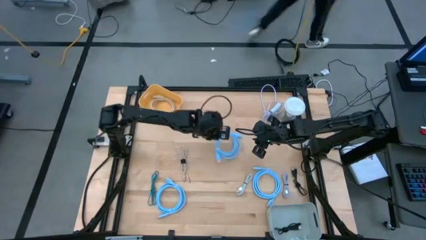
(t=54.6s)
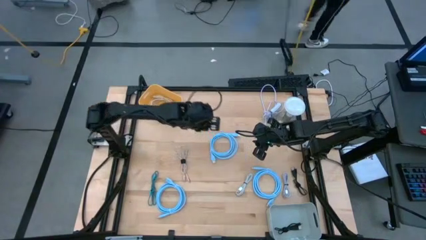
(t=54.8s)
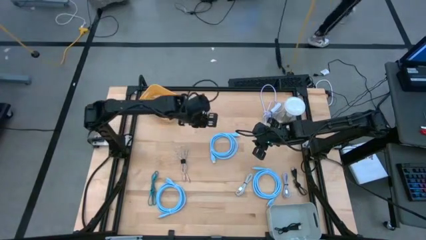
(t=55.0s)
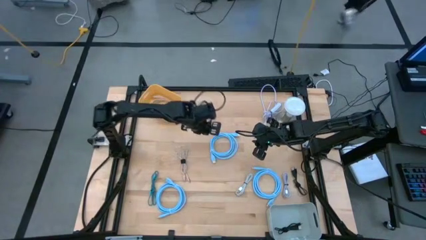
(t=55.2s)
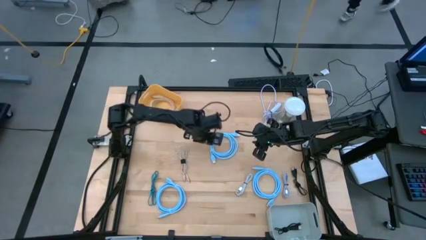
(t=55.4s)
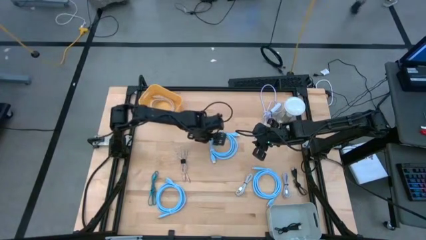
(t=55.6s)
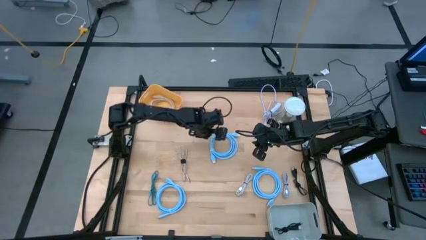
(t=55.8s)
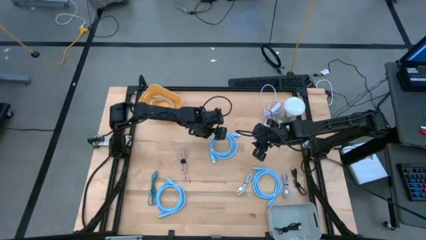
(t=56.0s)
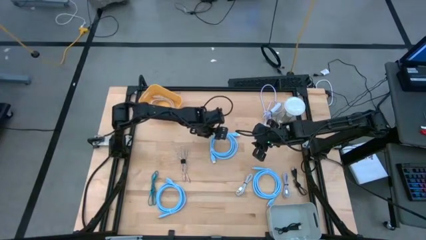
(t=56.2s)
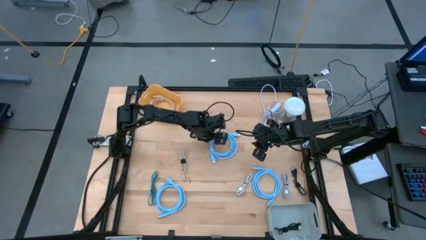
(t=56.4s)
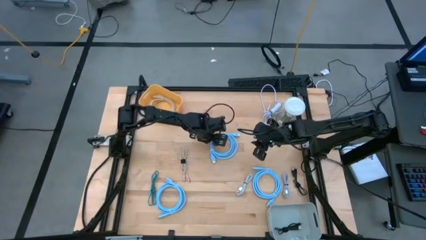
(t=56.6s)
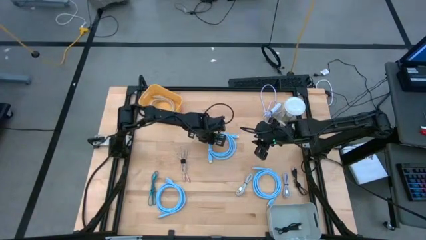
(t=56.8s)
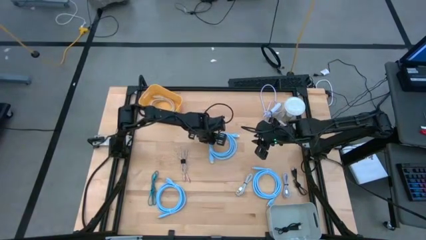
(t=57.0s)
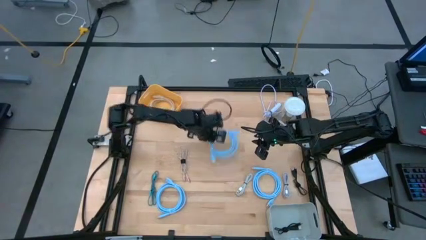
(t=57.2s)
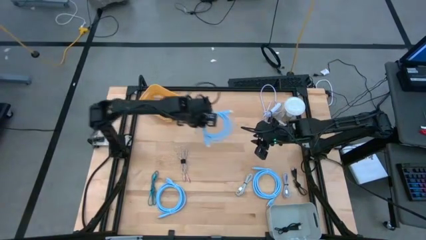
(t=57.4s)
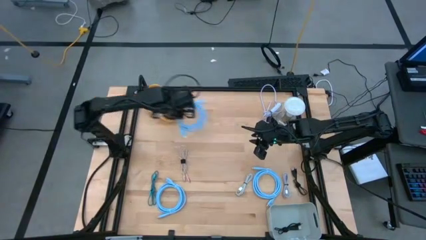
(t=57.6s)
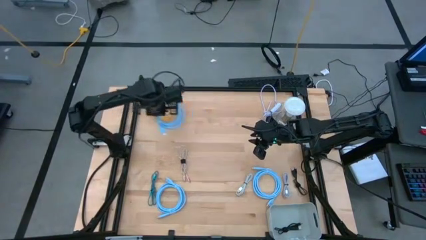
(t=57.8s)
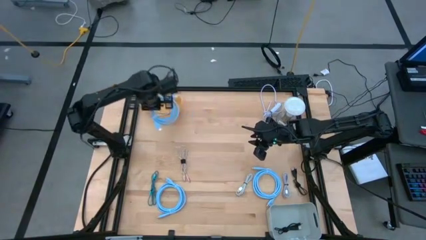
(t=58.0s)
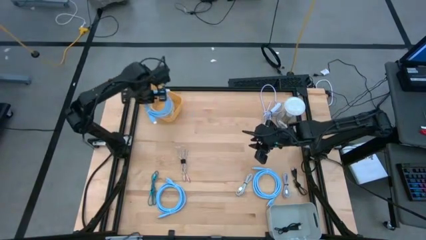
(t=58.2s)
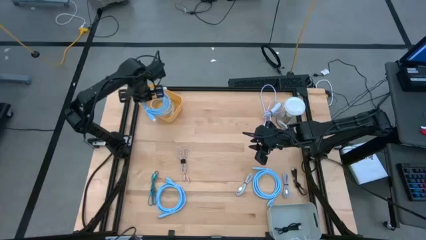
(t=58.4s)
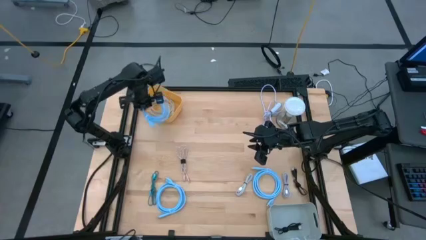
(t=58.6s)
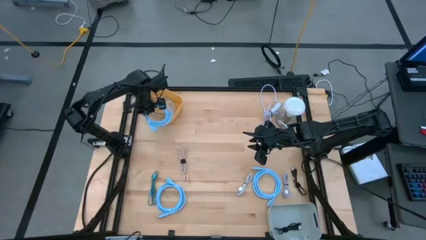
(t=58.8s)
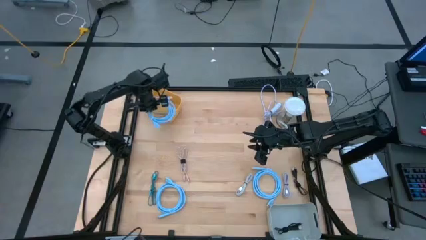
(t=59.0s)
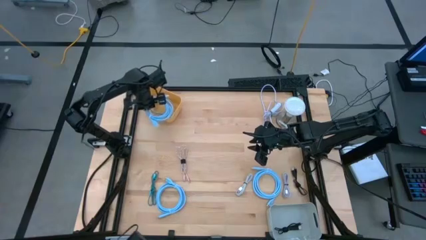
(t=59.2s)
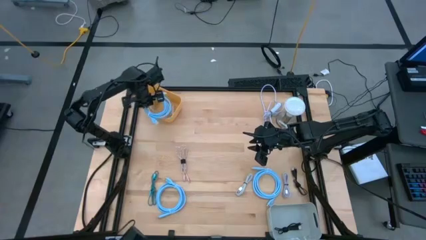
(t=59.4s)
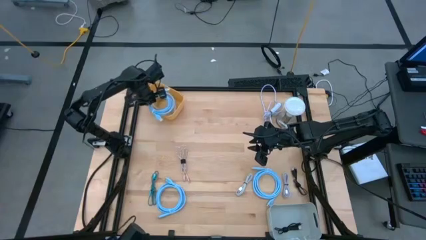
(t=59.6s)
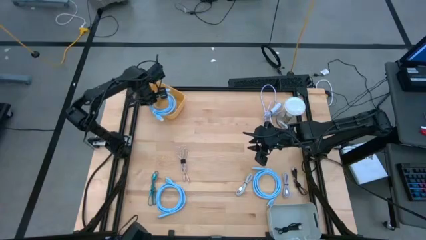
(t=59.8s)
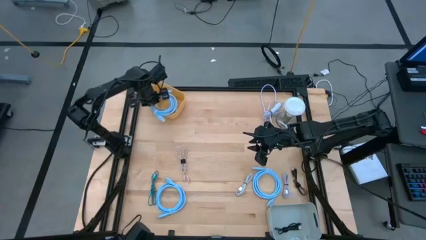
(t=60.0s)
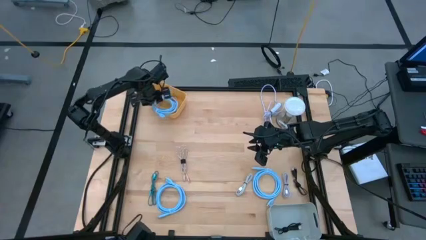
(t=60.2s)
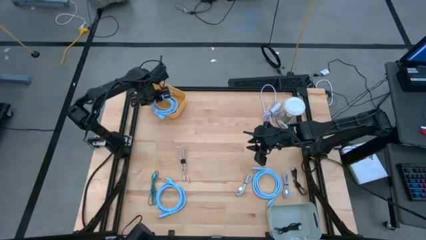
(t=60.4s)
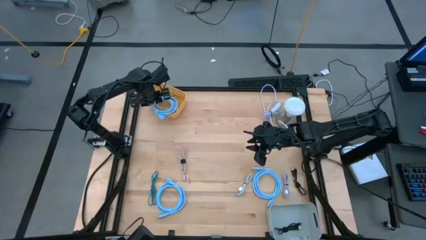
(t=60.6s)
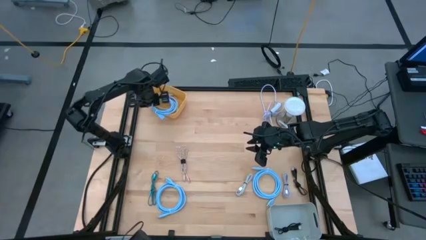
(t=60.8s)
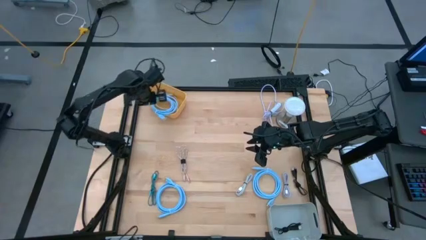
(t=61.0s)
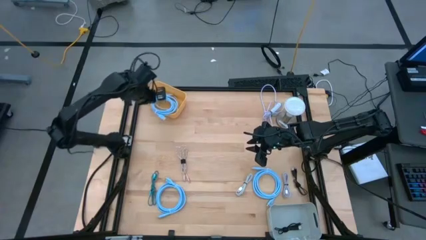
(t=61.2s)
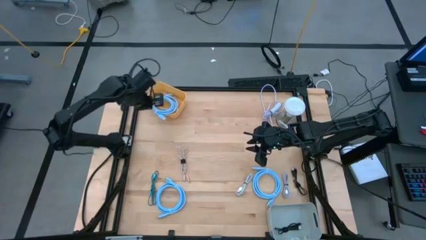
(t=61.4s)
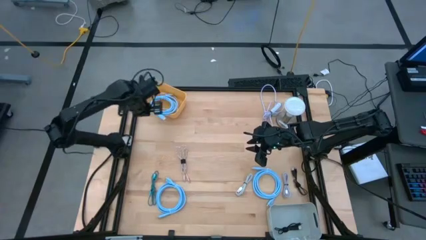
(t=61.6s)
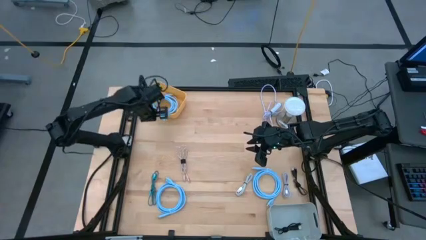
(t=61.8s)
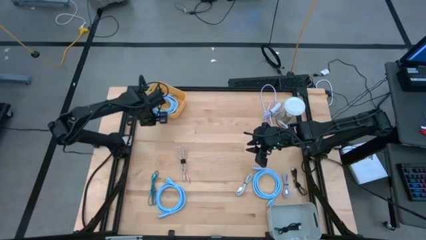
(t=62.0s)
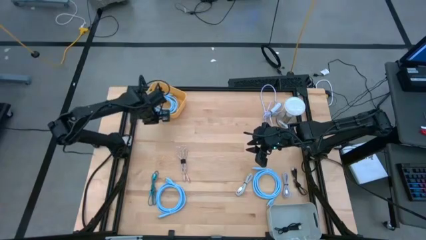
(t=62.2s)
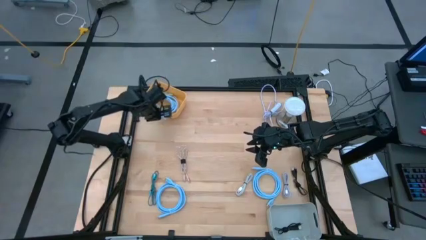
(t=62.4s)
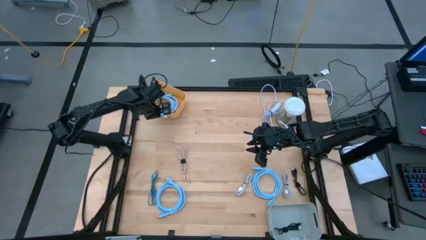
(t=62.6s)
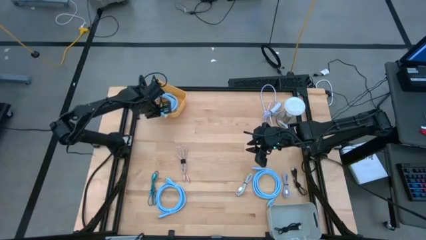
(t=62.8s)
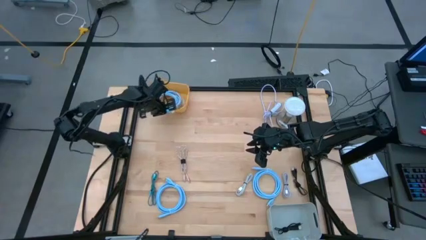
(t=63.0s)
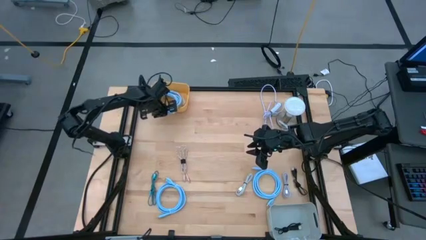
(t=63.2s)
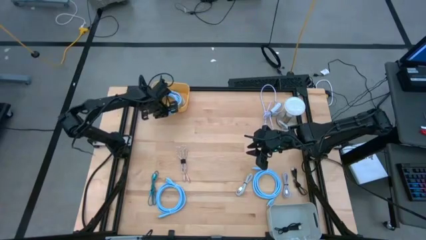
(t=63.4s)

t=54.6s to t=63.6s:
Task: Pick & Place USB Port
Put the middle blue hdmi cable into the yellow bin

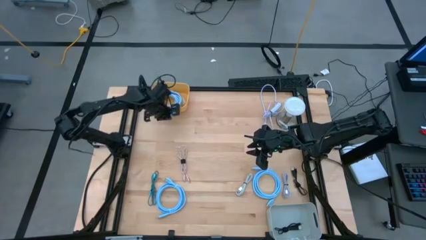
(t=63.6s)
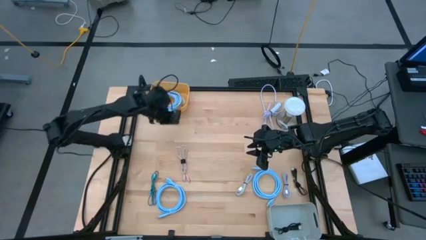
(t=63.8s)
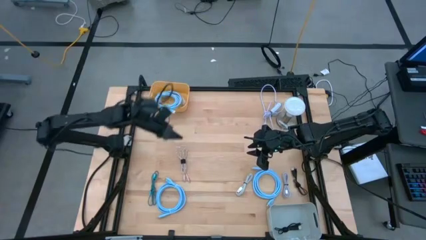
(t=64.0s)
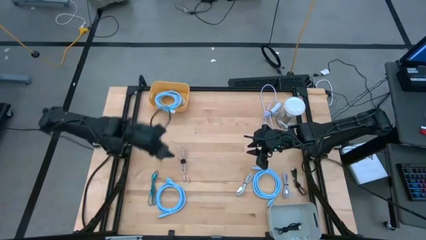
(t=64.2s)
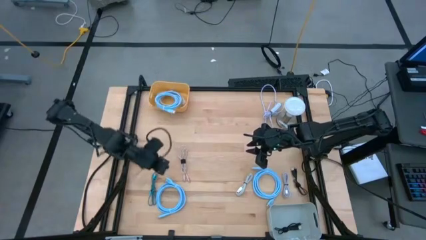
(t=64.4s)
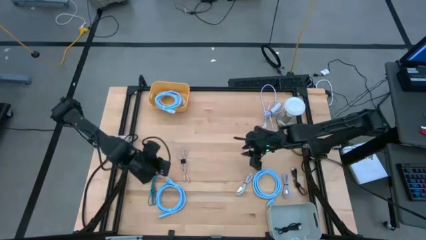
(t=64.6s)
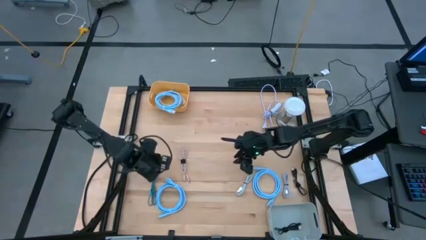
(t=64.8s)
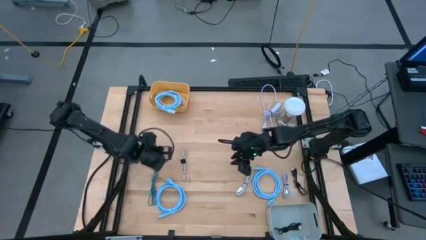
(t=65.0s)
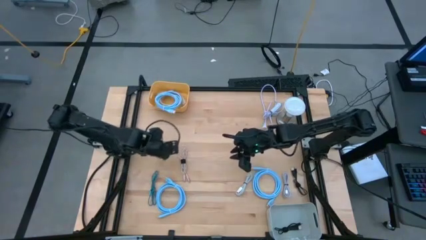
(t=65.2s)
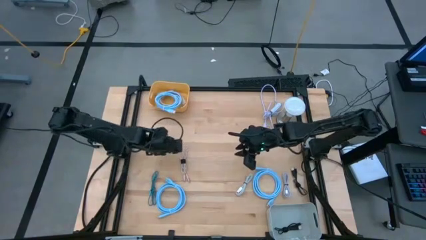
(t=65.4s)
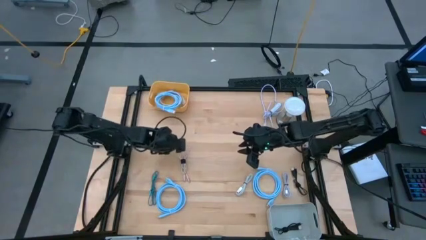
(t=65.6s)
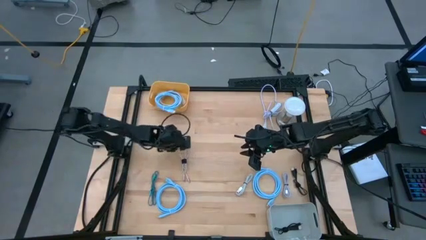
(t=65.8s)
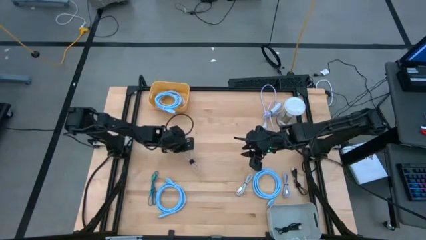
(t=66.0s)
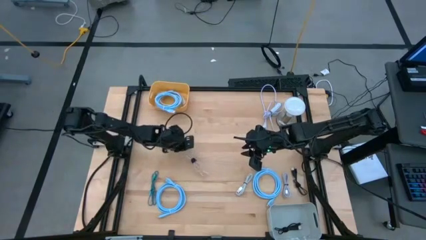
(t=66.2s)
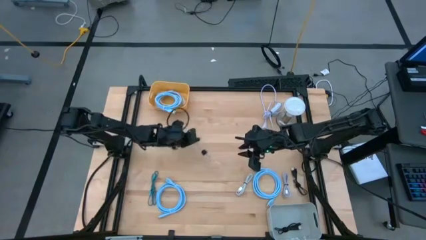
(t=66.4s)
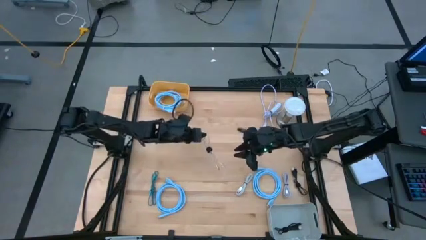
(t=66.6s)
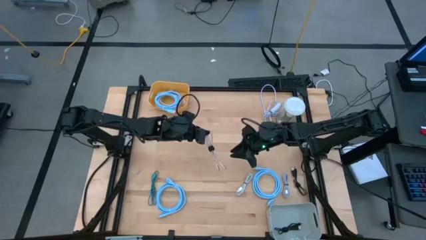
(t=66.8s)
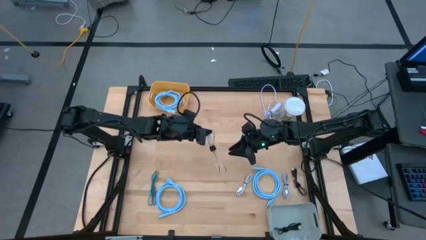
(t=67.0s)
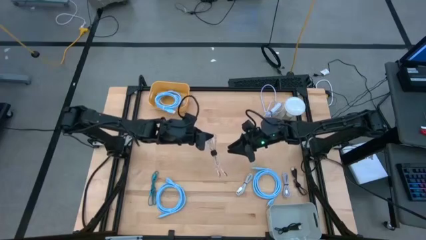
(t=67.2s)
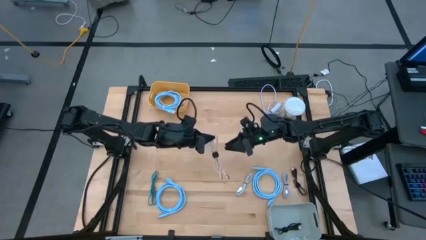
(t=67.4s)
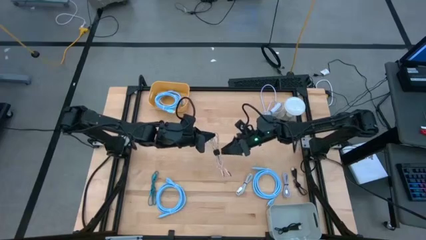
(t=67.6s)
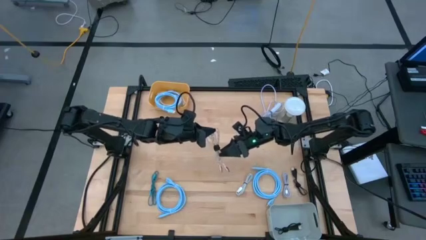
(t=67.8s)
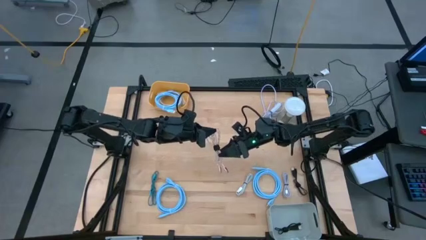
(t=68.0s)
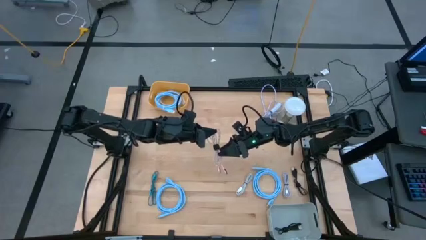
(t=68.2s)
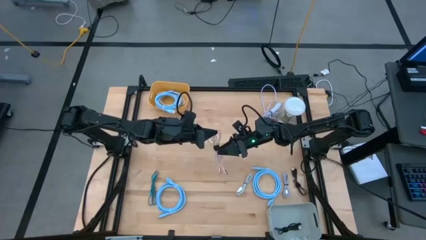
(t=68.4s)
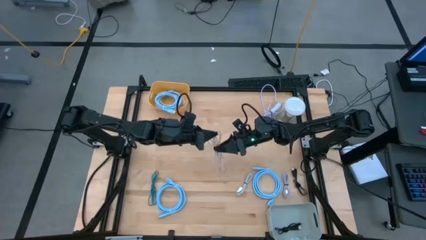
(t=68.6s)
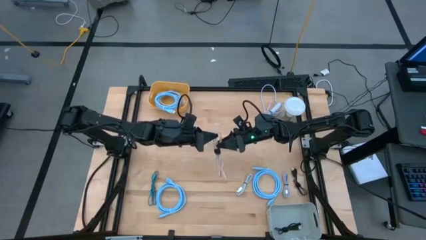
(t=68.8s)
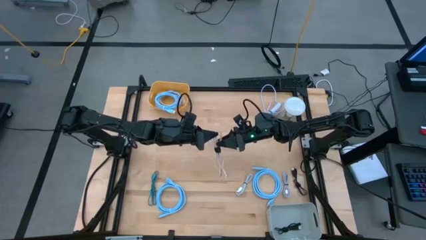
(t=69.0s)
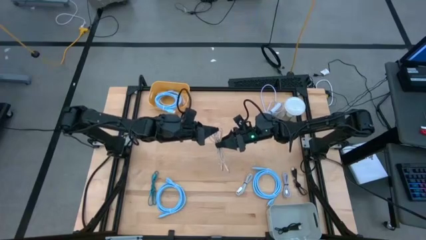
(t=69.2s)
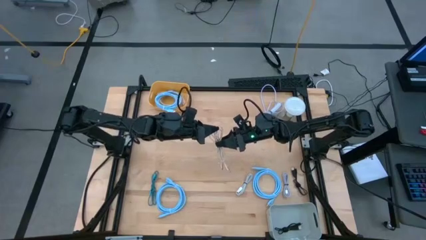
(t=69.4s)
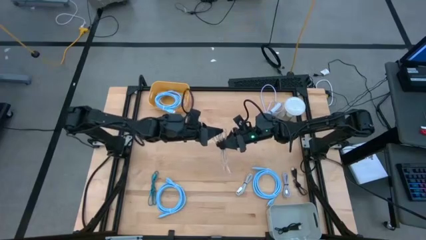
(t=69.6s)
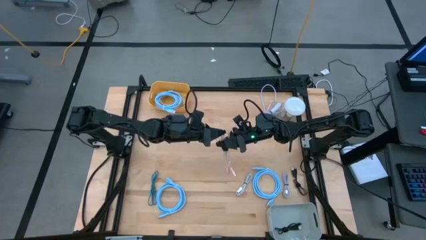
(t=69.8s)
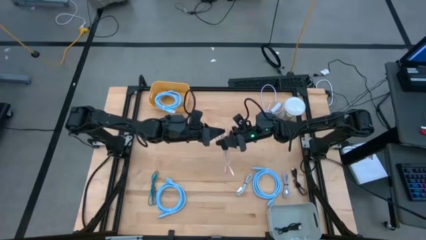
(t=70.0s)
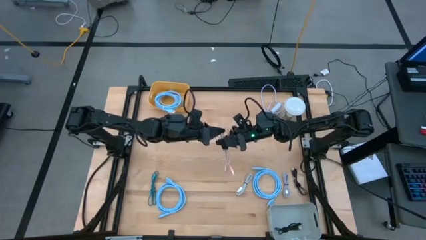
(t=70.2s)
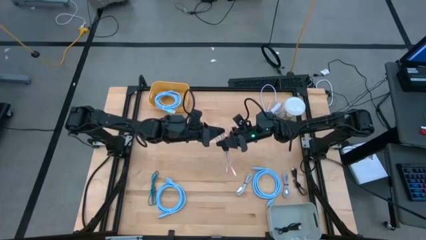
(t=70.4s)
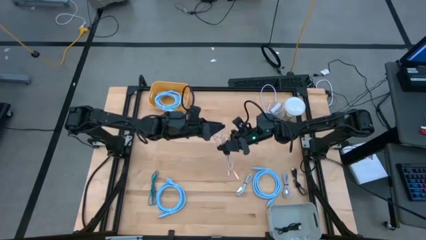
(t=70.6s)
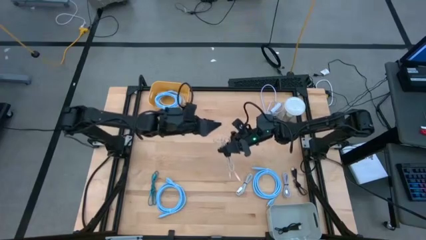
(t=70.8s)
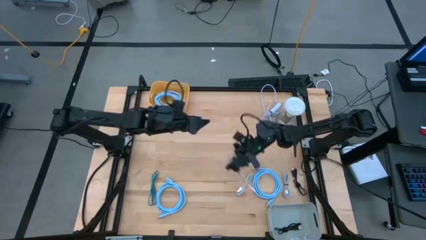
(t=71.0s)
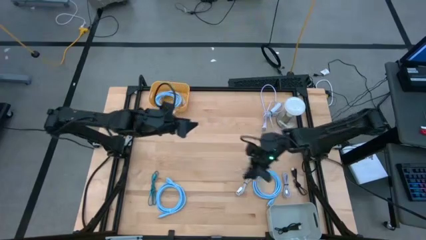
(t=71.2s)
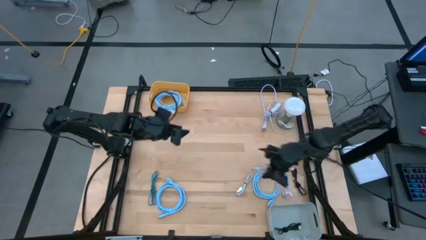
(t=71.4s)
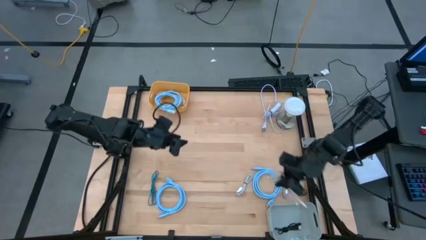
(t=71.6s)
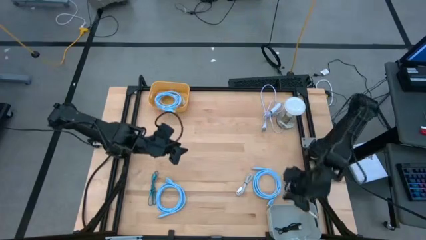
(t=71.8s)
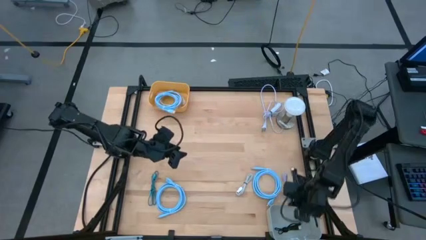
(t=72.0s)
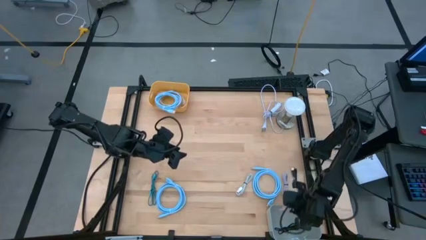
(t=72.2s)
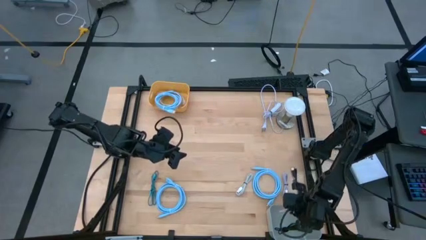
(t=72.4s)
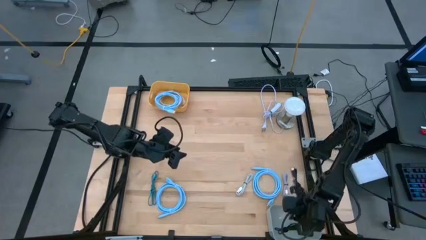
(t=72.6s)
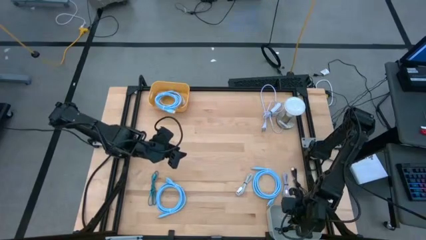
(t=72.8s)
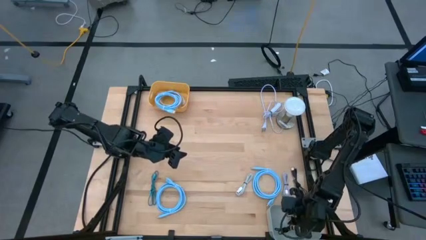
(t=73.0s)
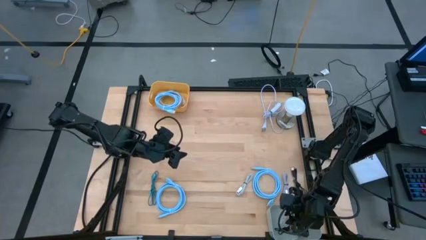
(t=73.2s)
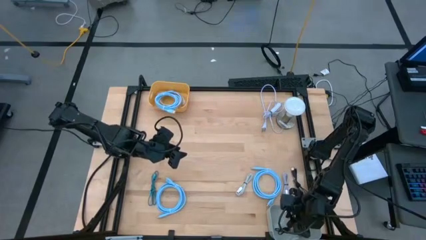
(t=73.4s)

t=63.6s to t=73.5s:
Put the orange charger cable into the gray bin
